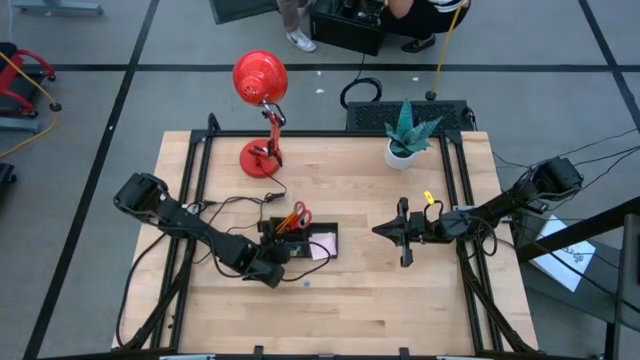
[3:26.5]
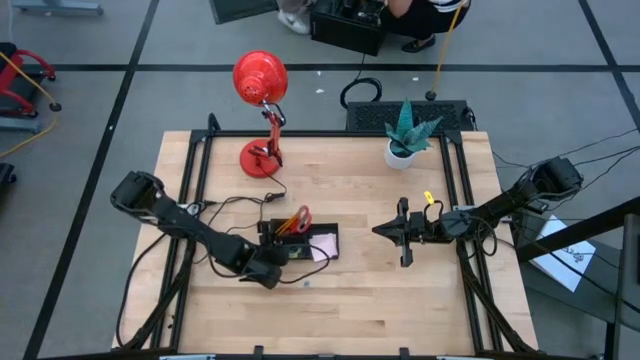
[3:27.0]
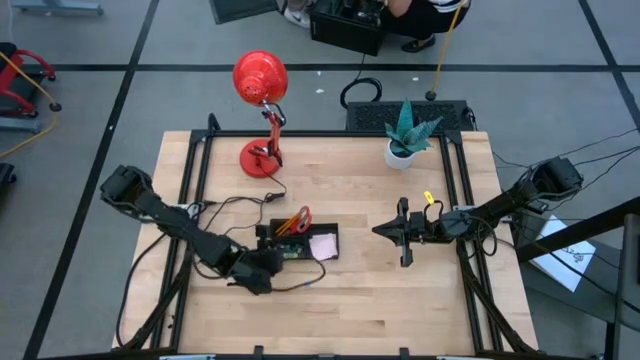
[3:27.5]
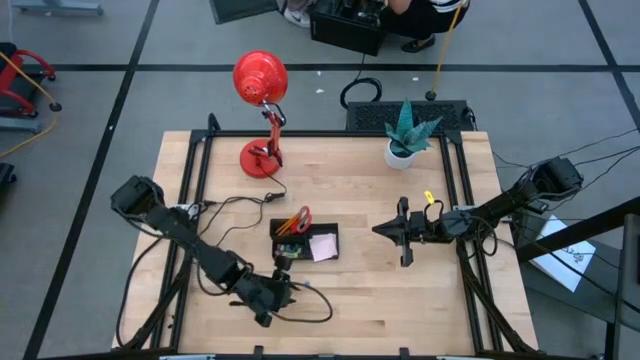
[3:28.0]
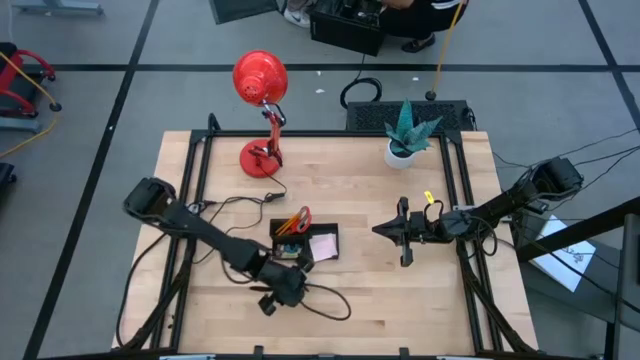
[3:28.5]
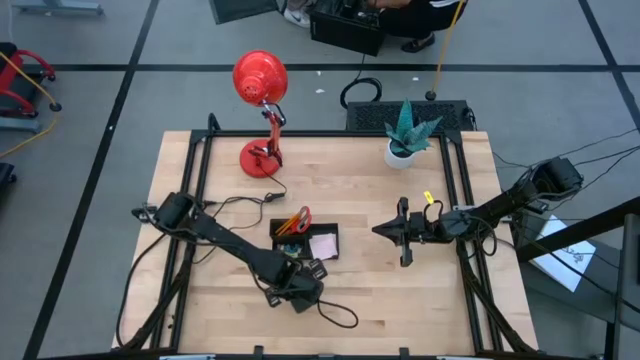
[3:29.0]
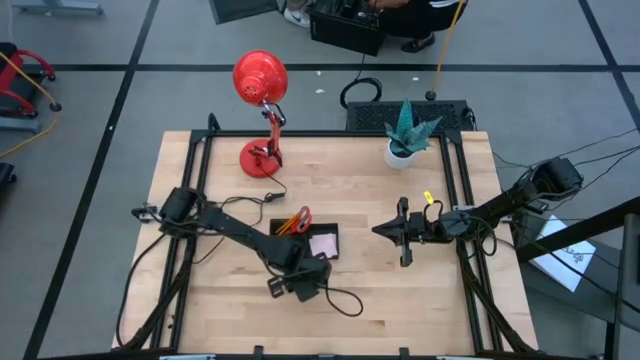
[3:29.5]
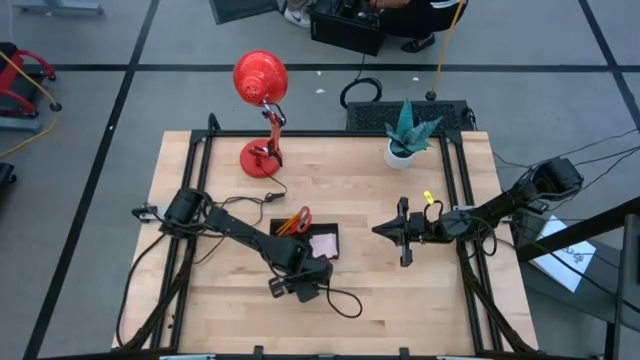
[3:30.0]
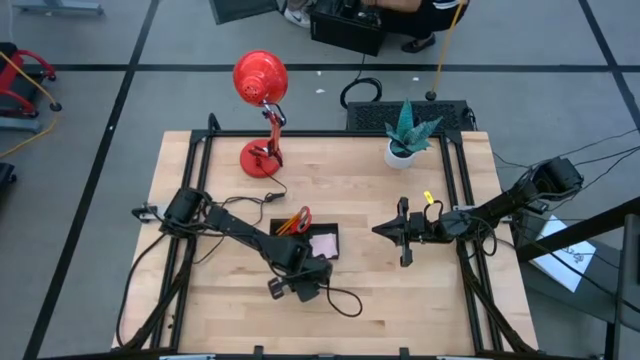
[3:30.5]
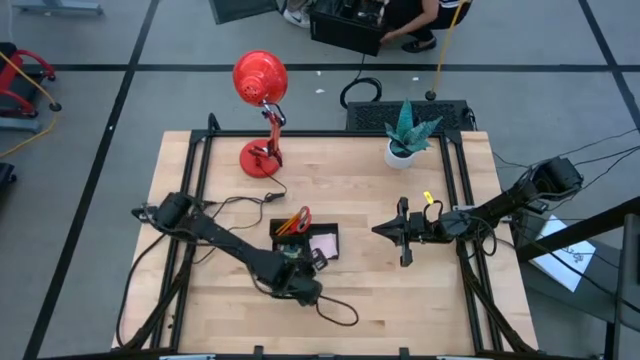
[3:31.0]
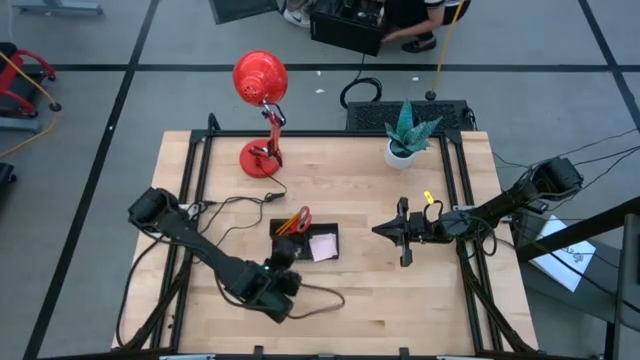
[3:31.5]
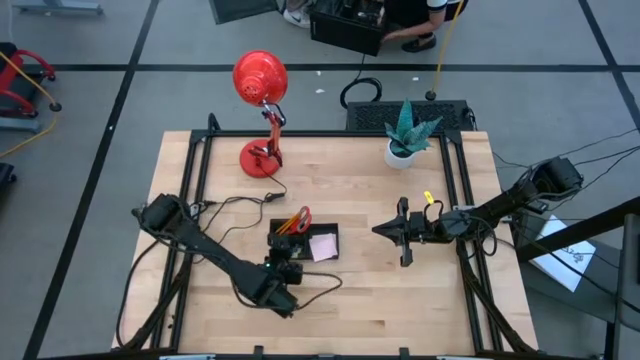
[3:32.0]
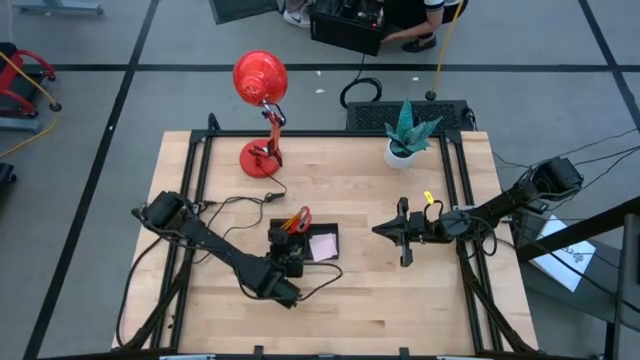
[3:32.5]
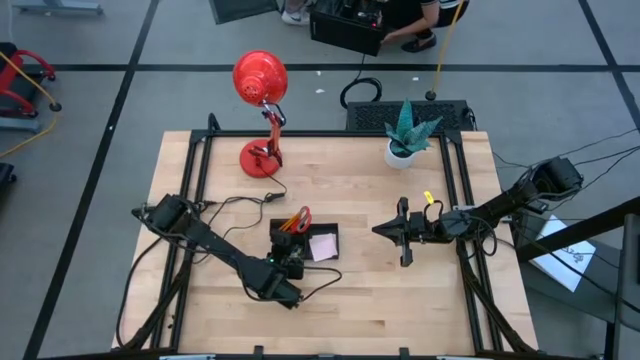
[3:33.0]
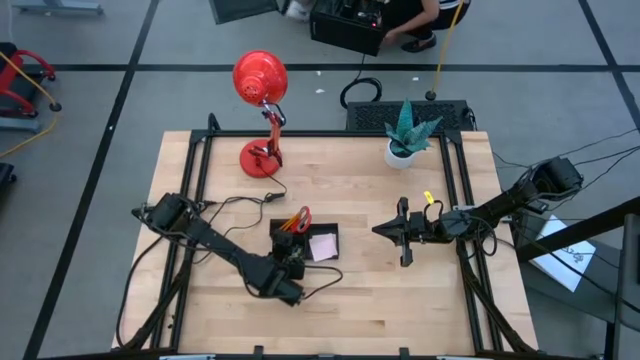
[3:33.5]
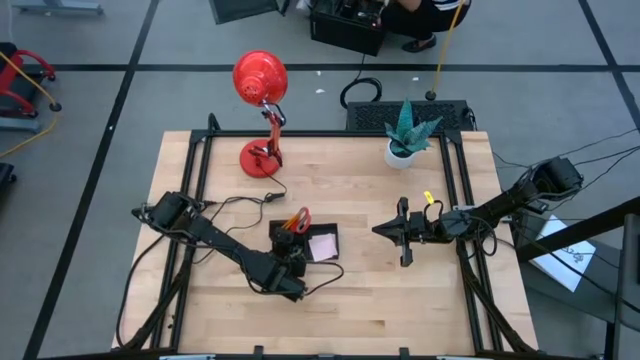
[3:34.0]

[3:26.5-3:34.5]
Task: Pick and place office supplies into organizer
Put the blue binder clip into the desk organizer

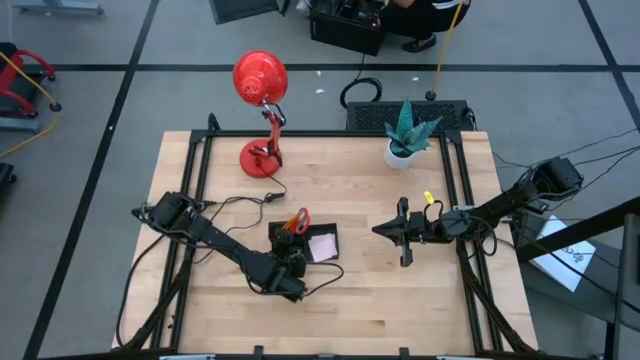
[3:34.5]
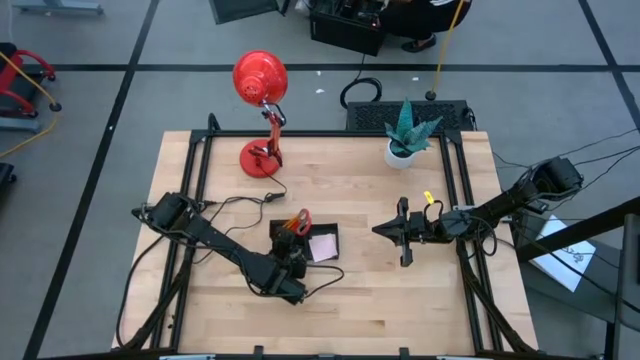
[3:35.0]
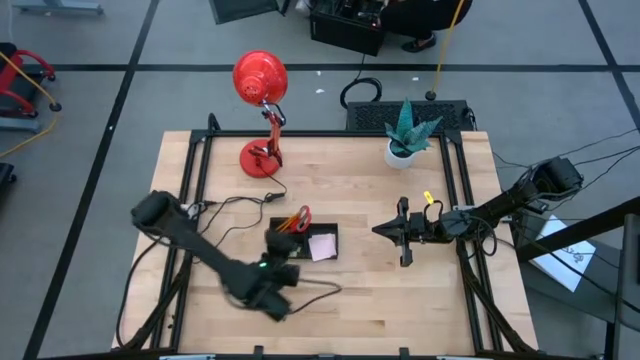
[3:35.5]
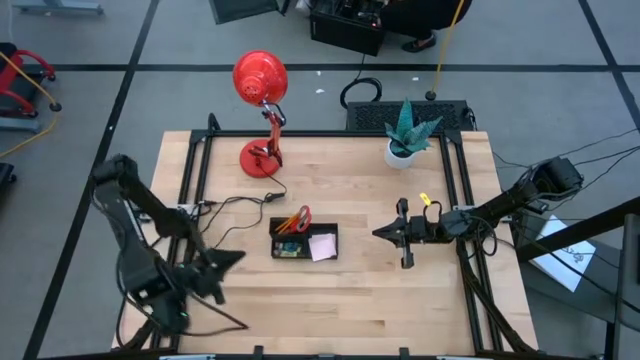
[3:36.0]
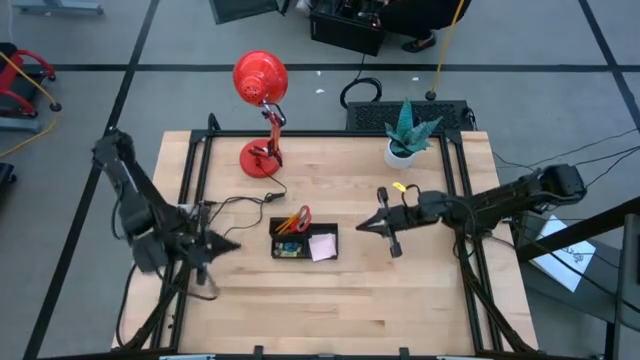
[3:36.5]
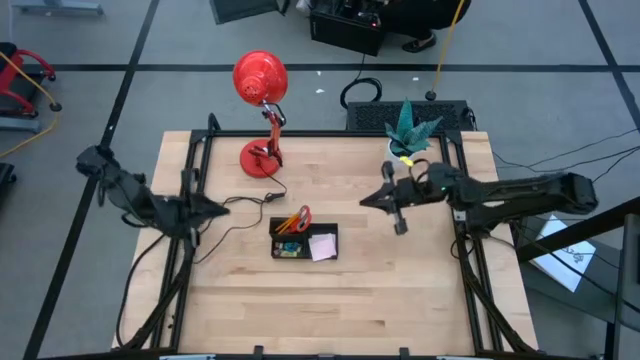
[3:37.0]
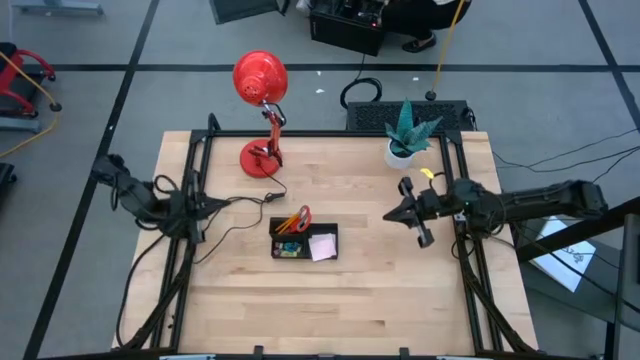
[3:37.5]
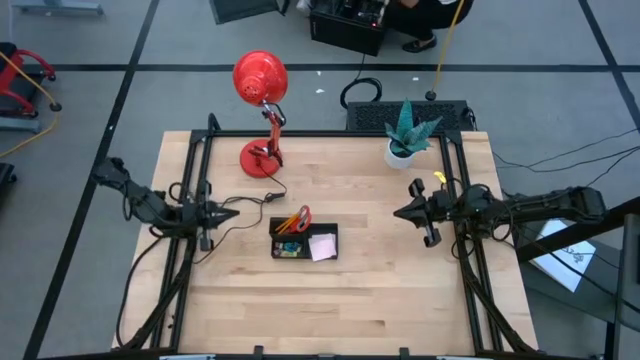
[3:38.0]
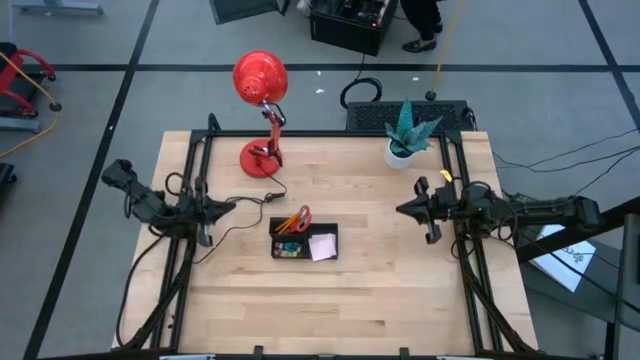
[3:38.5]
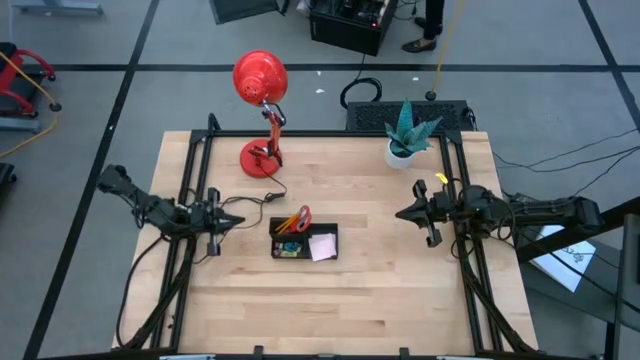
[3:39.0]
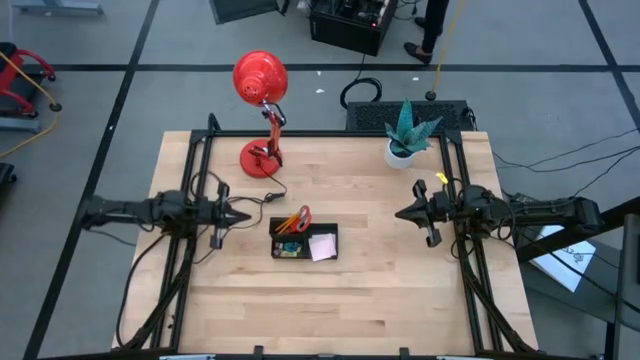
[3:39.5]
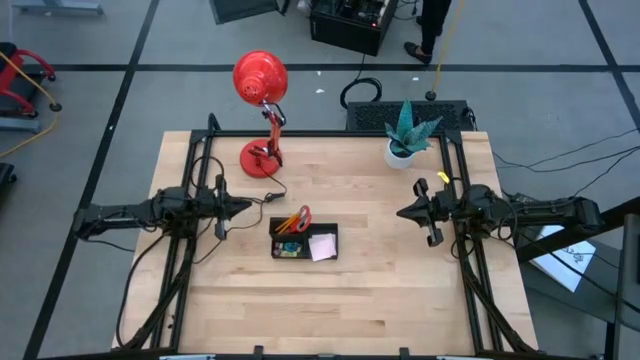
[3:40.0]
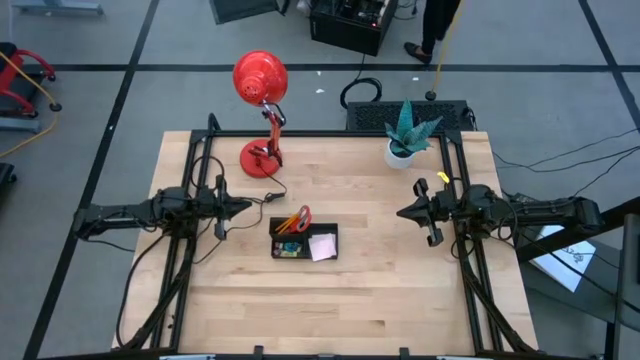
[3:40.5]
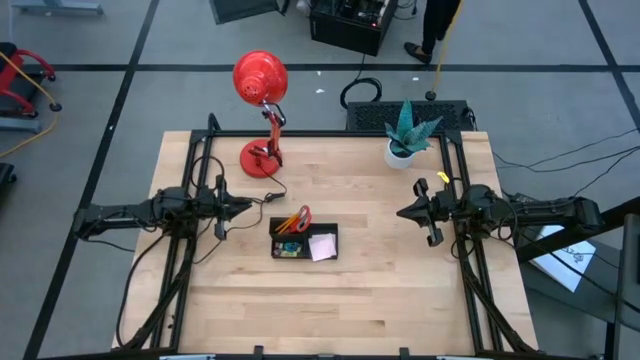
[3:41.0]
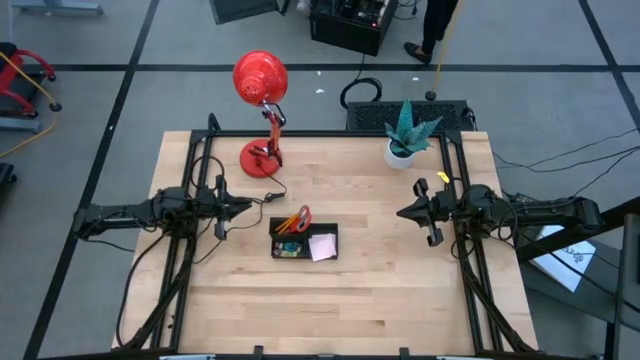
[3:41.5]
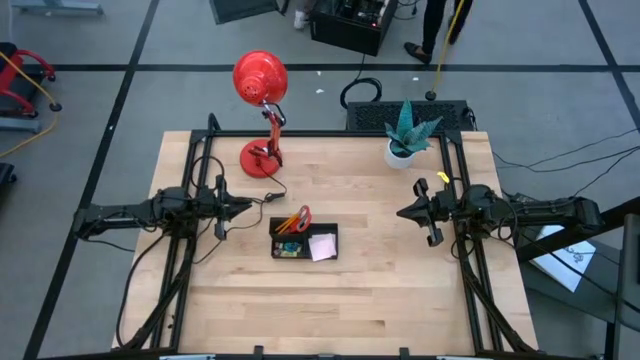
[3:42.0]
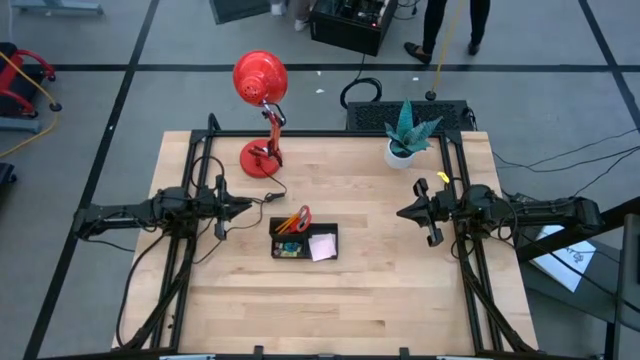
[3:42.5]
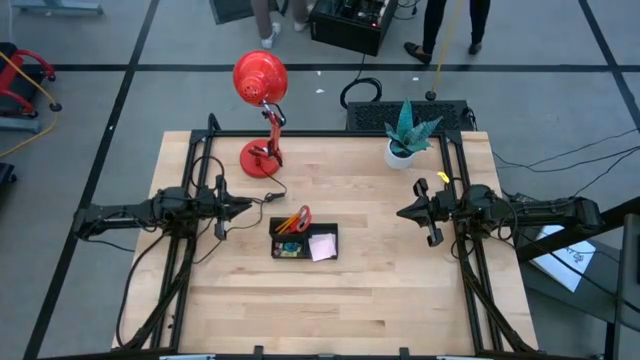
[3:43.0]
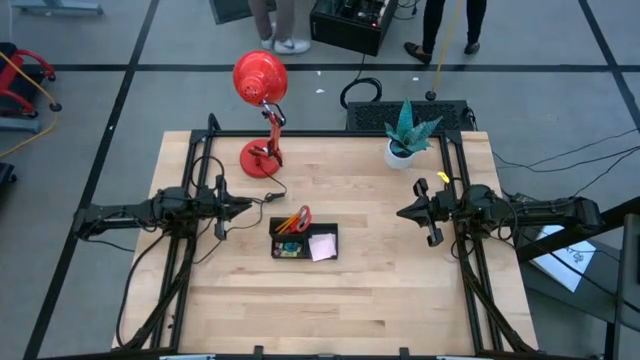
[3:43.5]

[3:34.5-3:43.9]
Return to Home Position

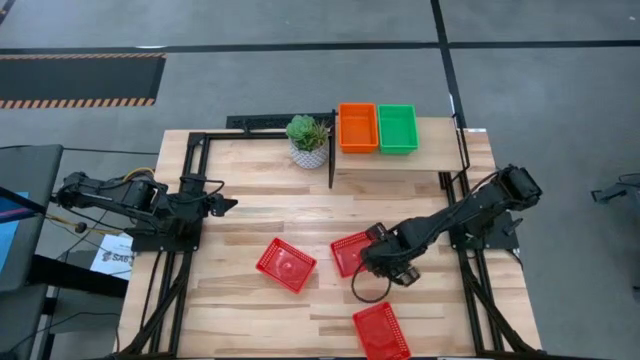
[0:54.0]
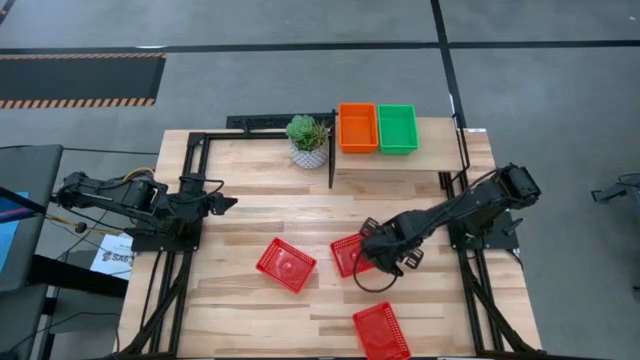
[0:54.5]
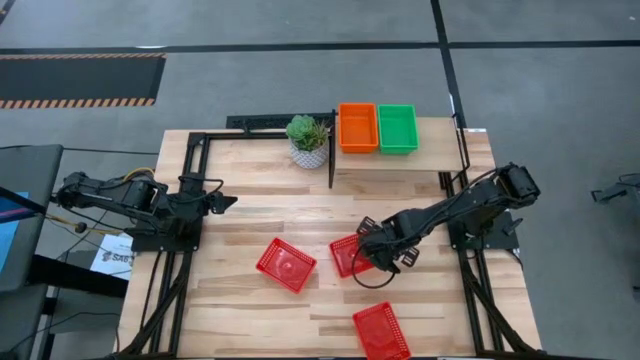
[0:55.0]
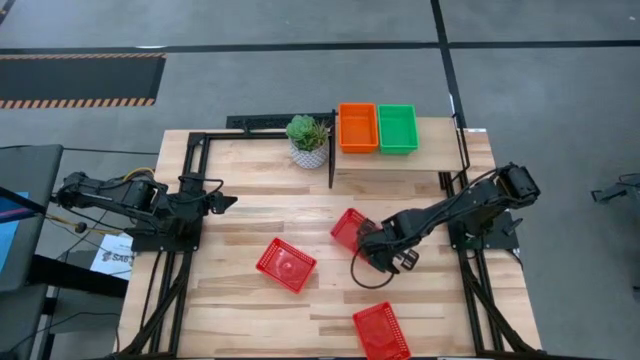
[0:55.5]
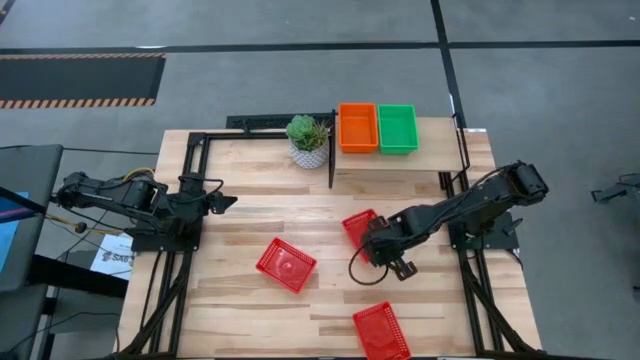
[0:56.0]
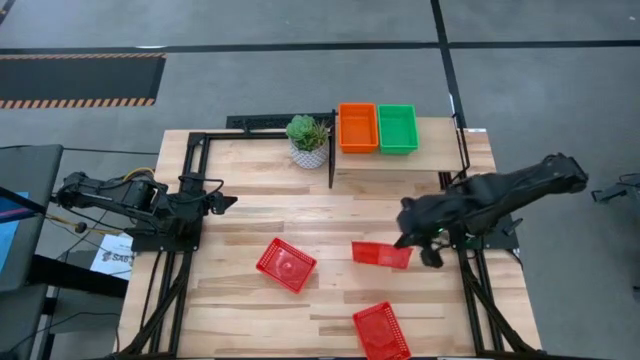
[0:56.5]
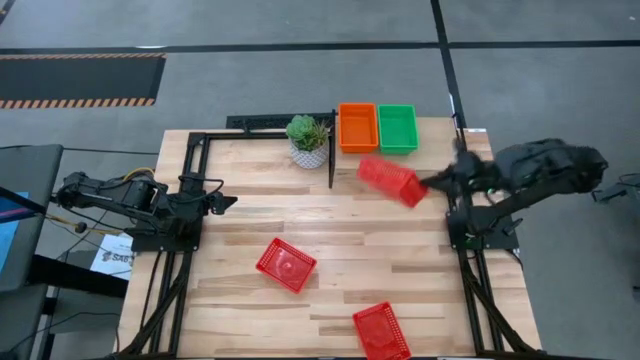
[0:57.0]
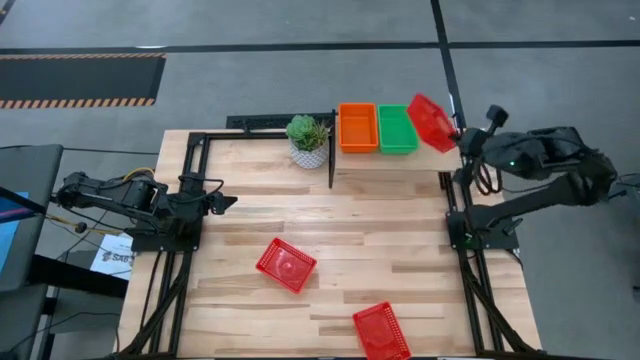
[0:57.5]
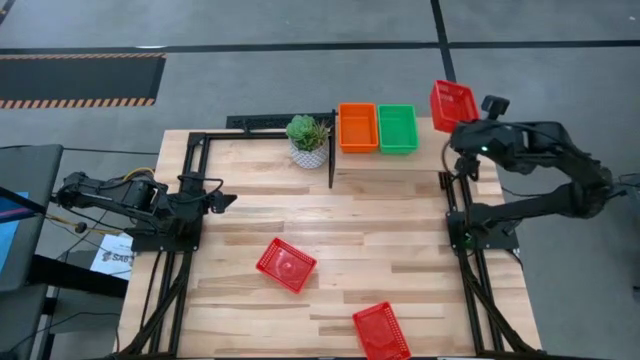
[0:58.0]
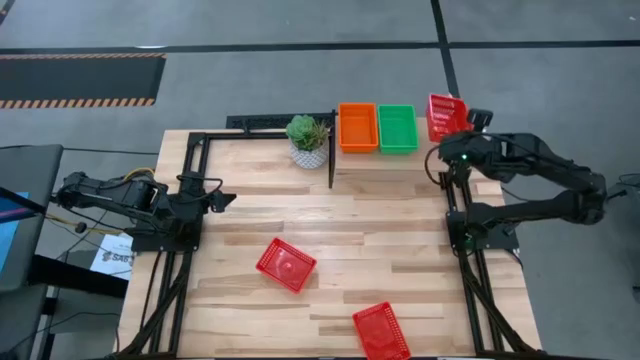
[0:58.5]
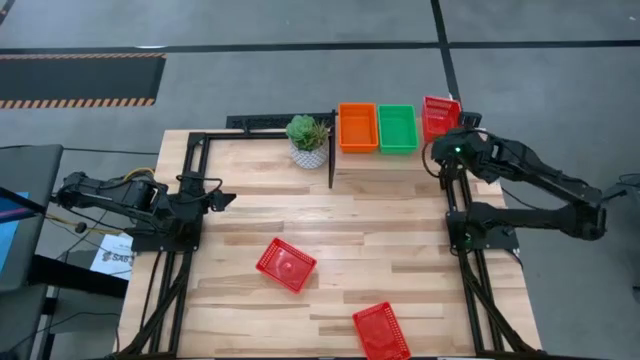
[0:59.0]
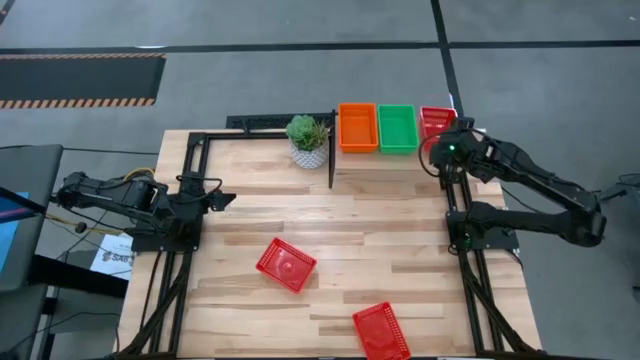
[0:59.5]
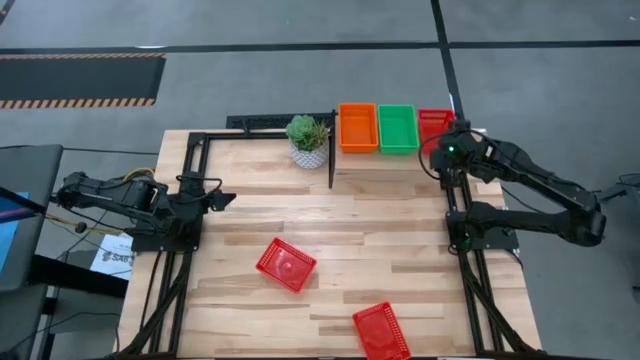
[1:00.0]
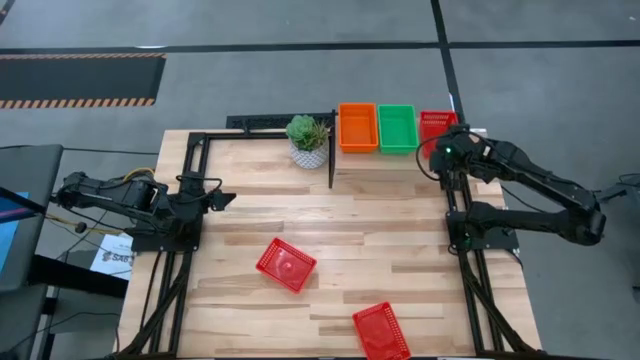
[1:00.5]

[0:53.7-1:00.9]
Task: Stack baskets on shelf by color
Put the top right red bin on the shelf
